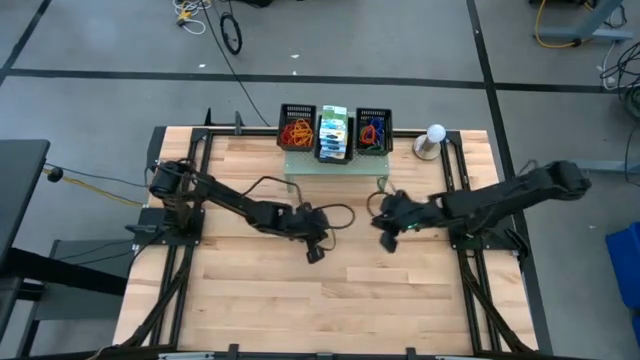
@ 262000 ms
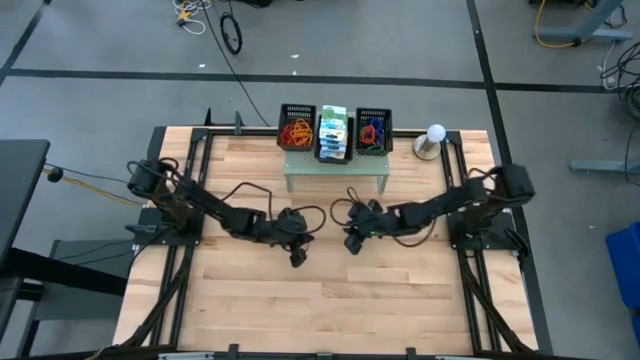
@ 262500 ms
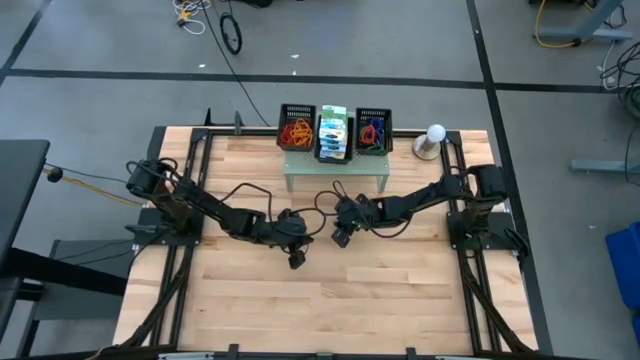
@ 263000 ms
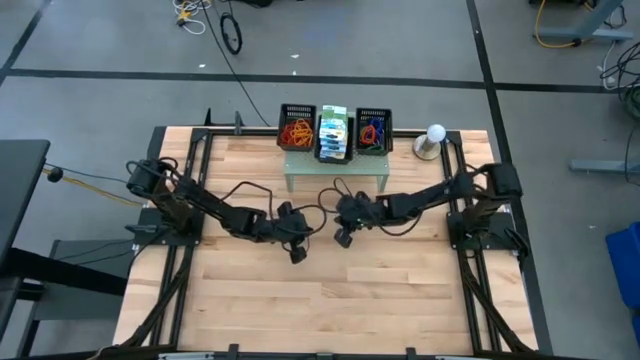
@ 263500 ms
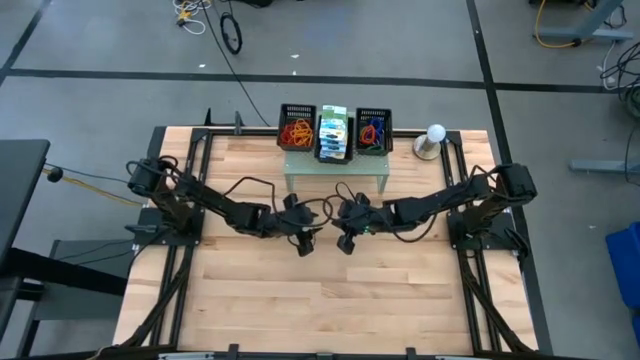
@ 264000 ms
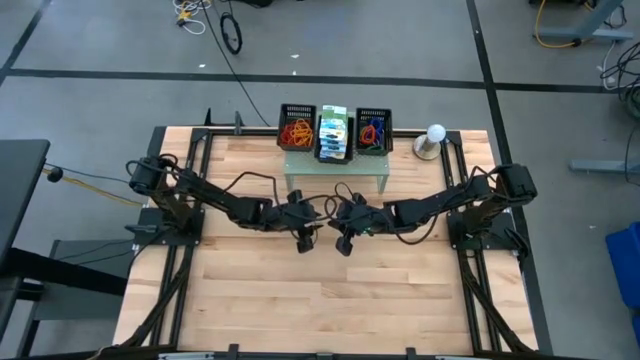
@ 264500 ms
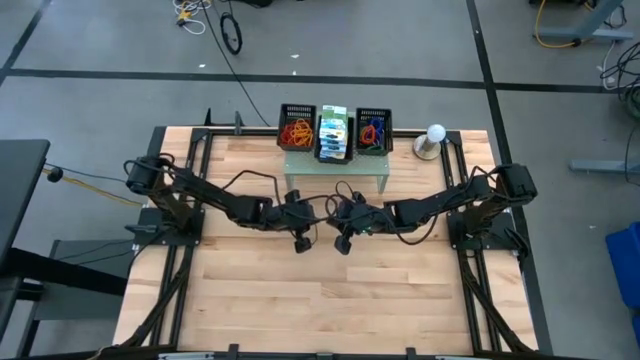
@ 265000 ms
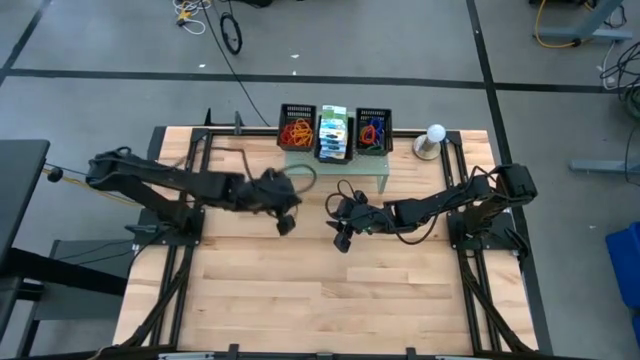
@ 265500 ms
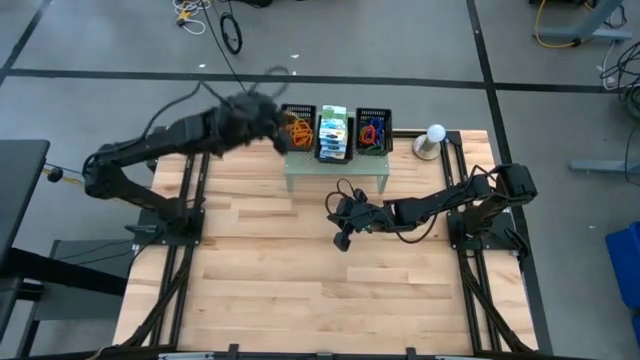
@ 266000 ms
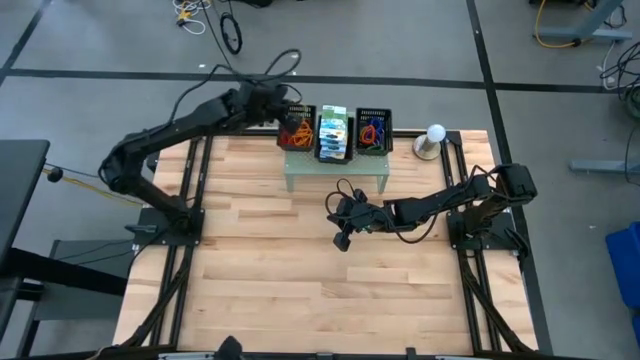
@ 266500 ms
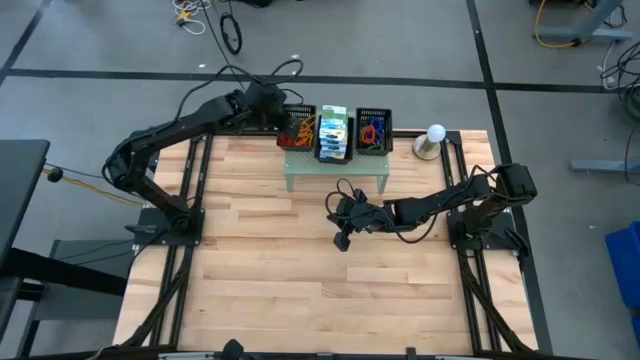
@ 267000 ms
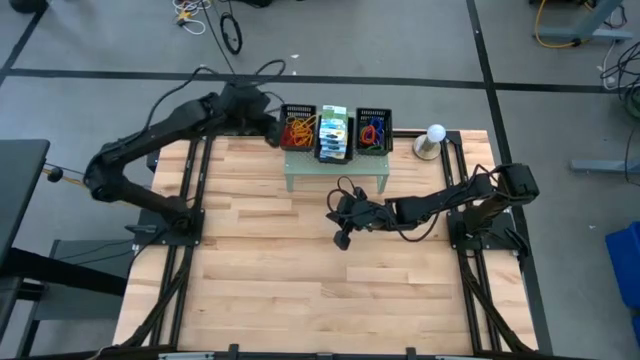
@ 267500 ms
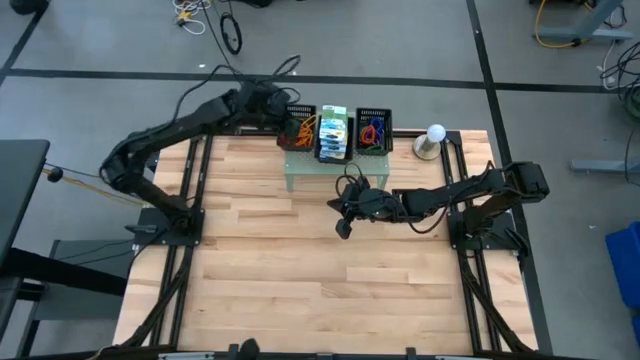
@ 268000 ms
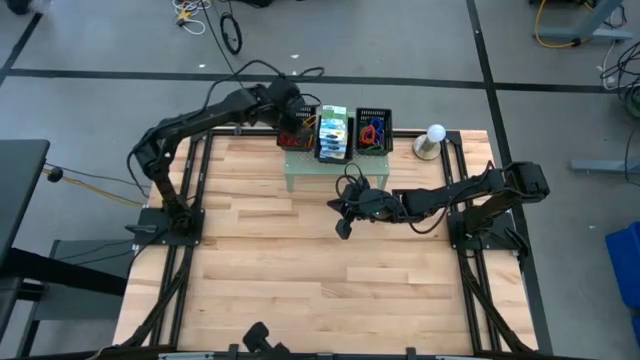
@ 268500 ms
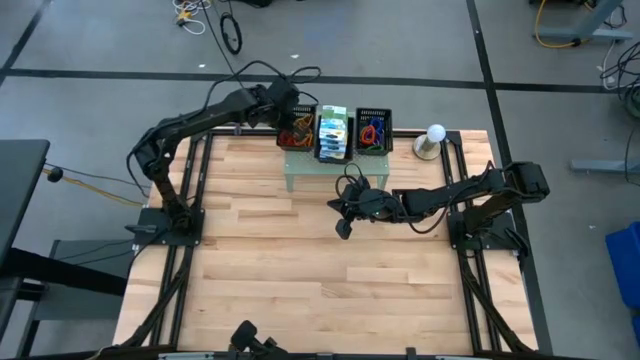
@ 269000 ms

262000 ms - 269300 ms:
Task: Pick & Place Office Desk Supplies
Put the yellow rubber band into the left black bin on the shelf

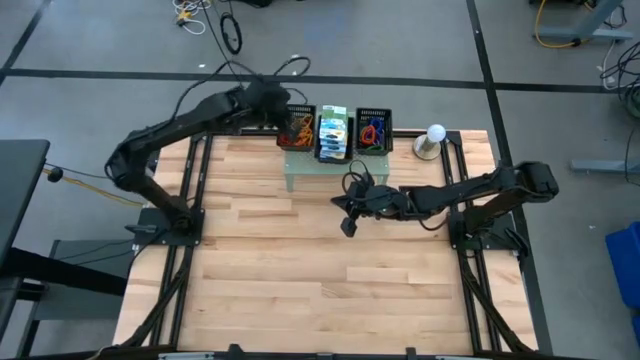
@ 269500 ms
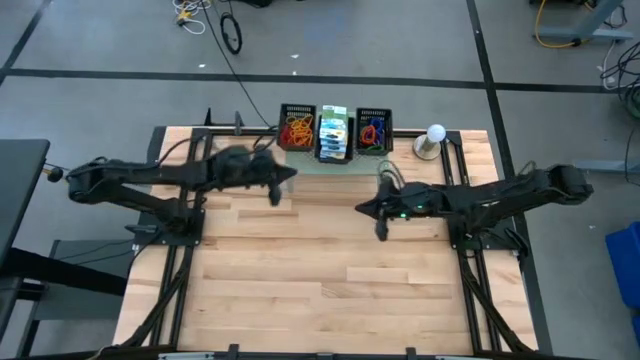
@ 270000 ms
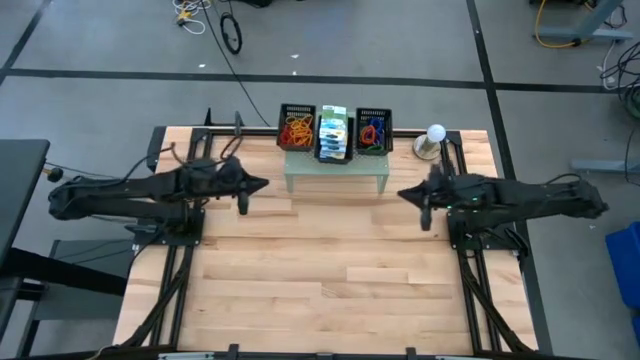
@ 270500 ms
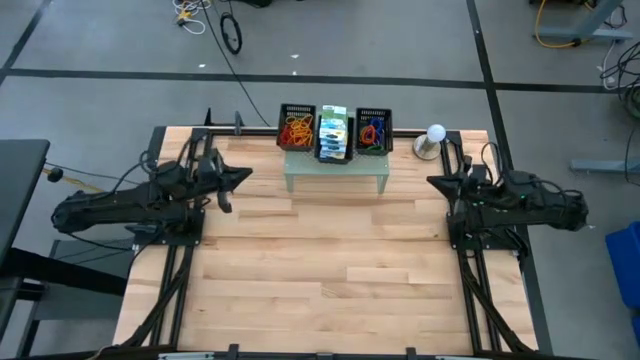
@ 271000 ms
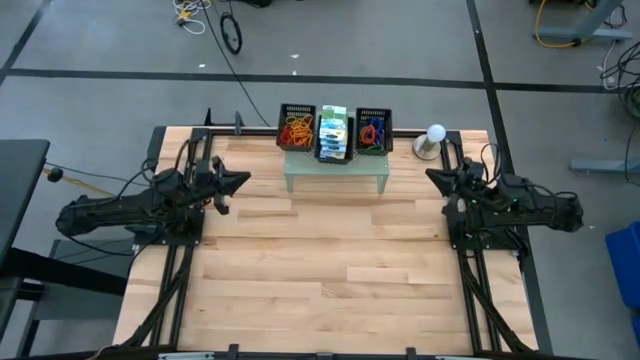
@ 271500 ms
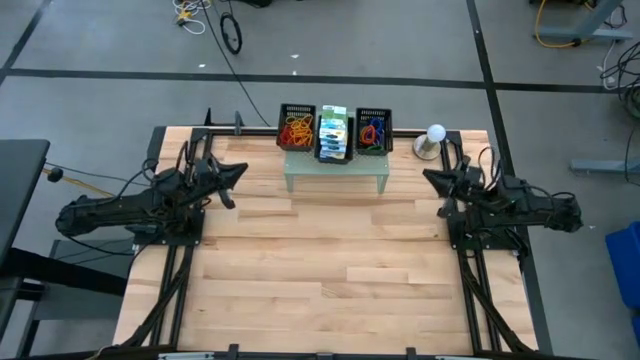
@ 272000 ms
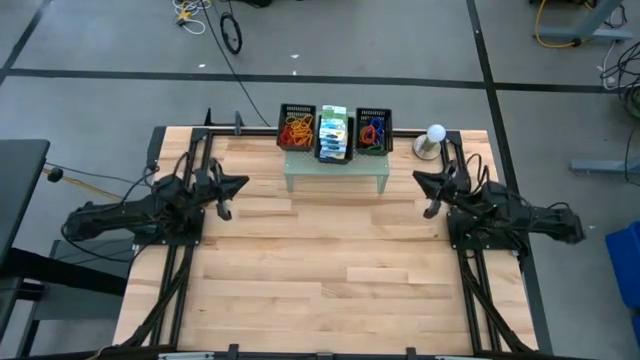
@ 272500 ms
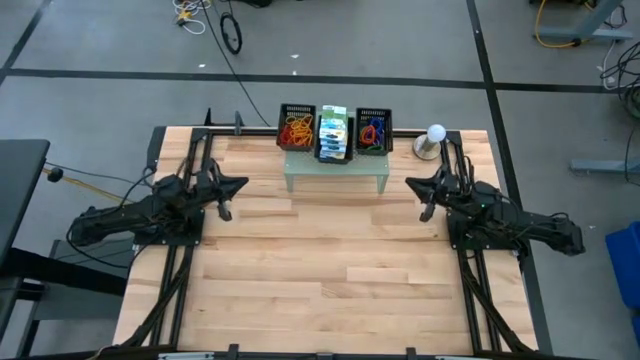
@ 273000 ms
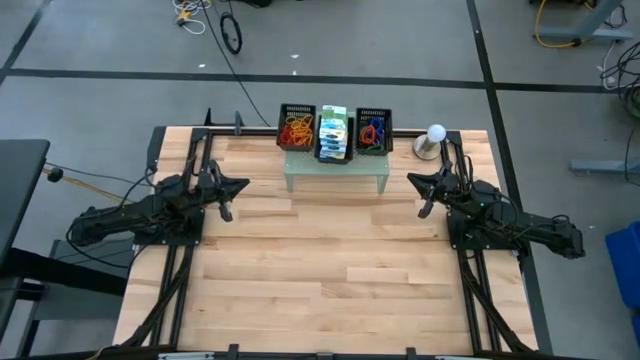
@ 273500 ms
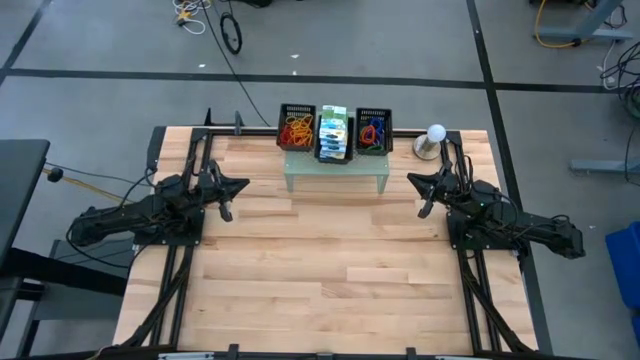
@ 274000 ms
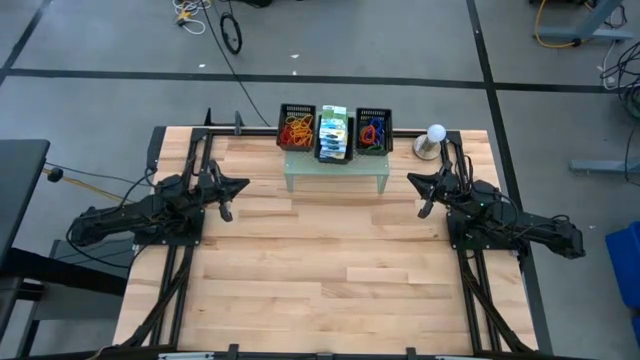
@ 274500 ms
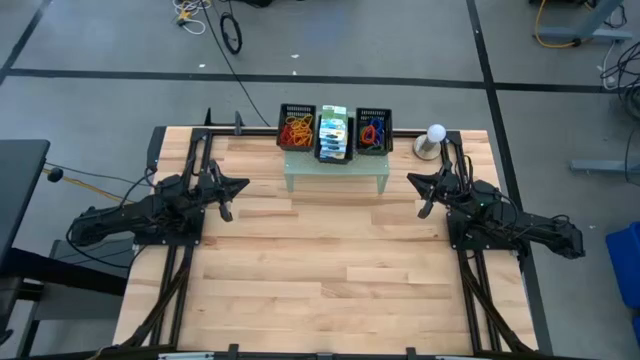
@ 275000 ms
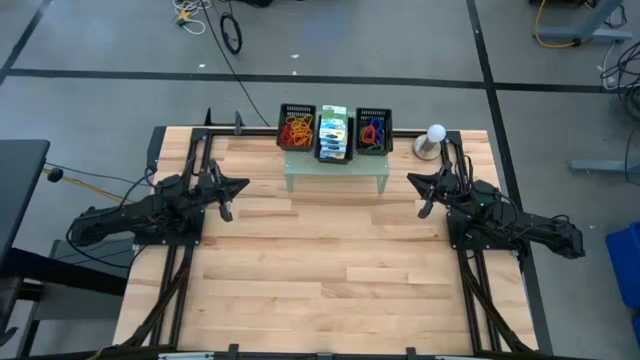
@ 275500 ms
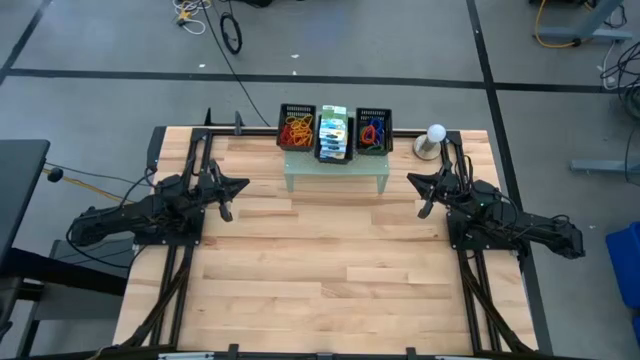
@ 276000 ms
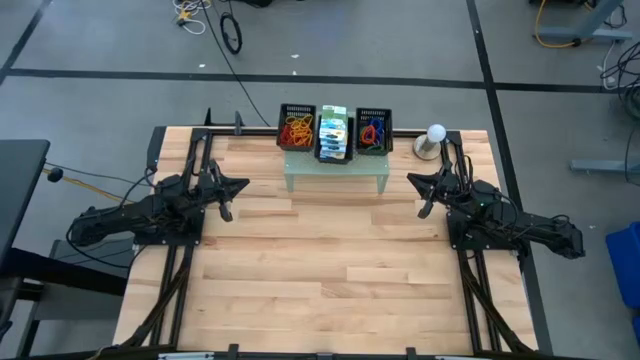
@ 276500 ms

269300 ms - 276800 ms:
Return to Home Position

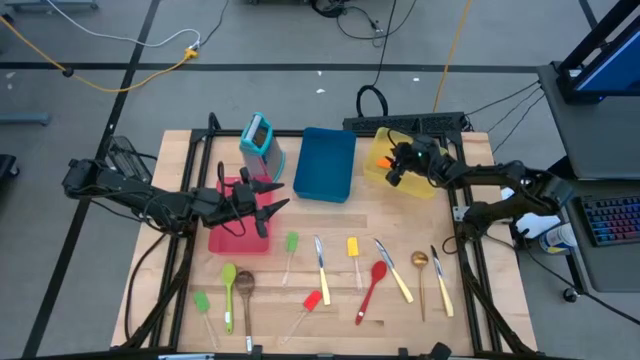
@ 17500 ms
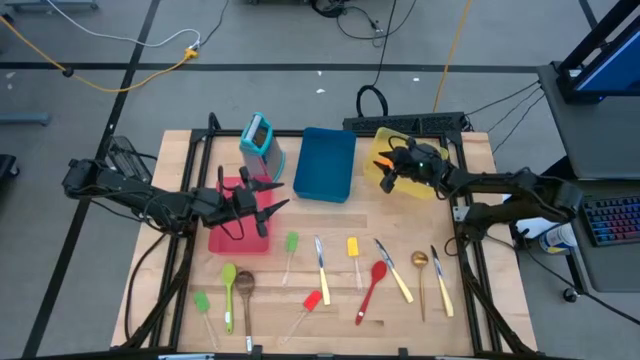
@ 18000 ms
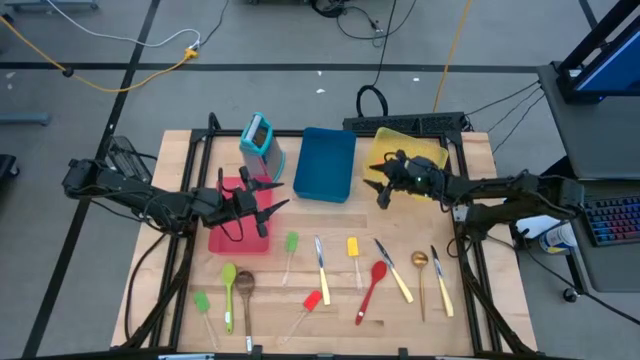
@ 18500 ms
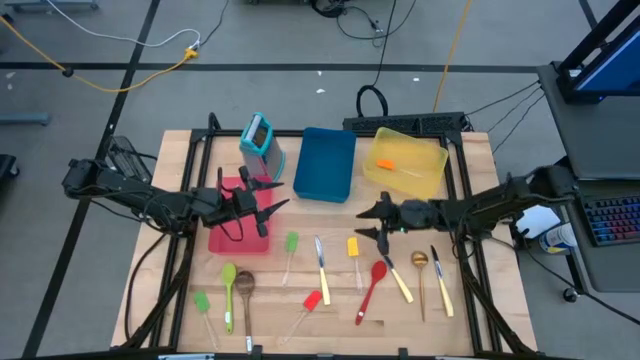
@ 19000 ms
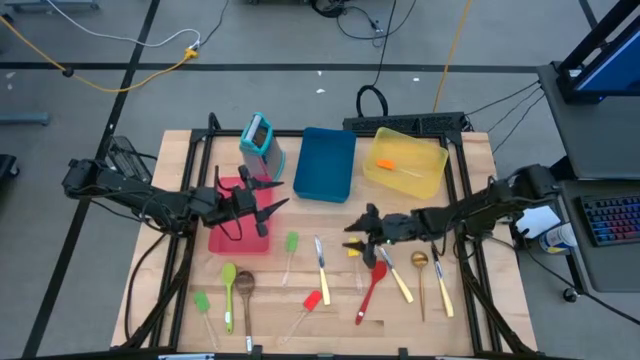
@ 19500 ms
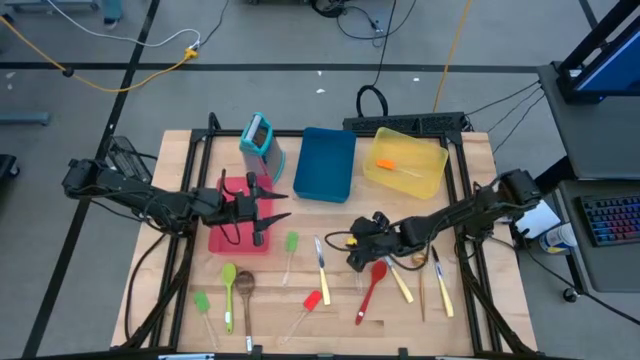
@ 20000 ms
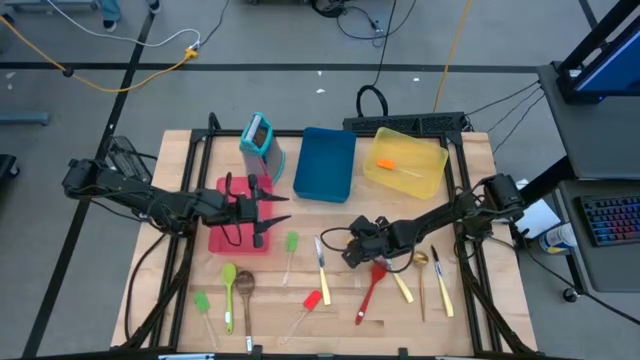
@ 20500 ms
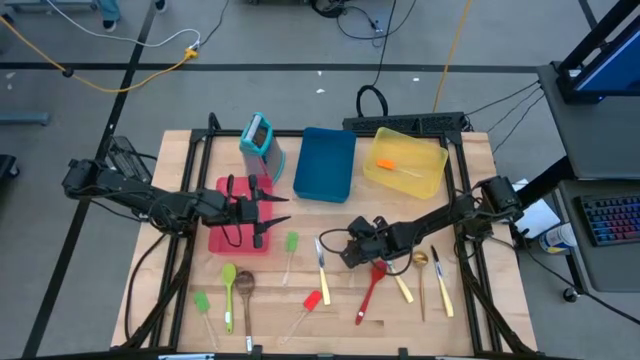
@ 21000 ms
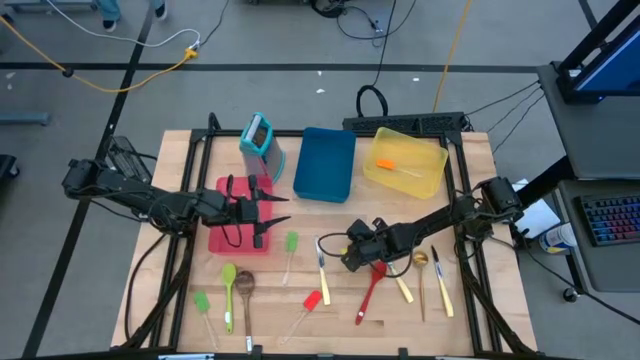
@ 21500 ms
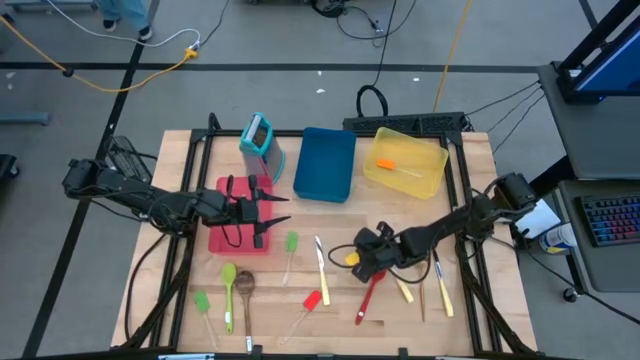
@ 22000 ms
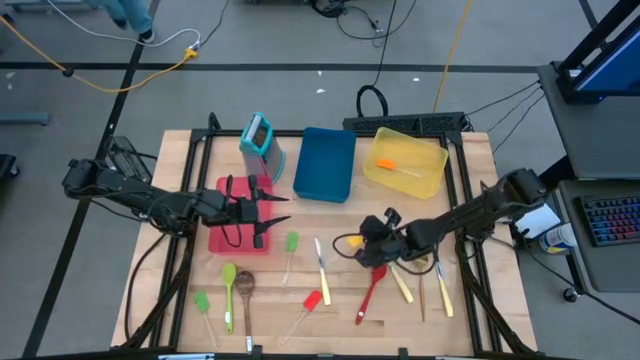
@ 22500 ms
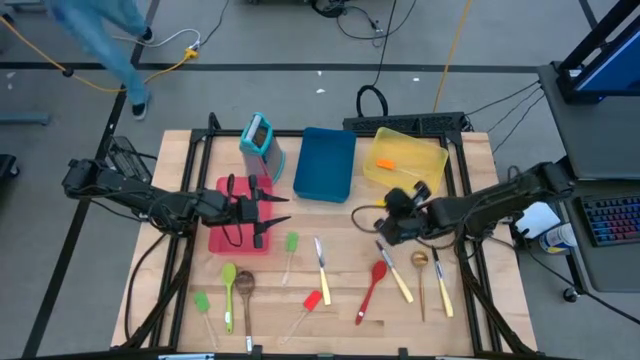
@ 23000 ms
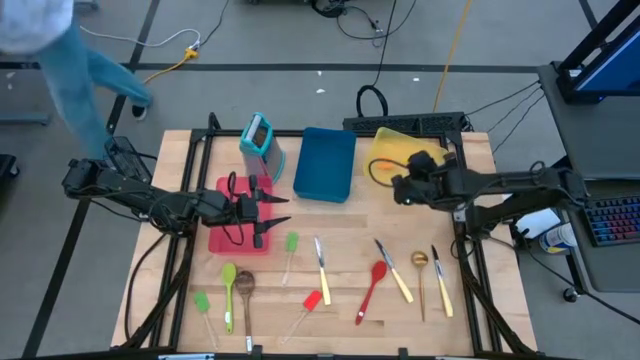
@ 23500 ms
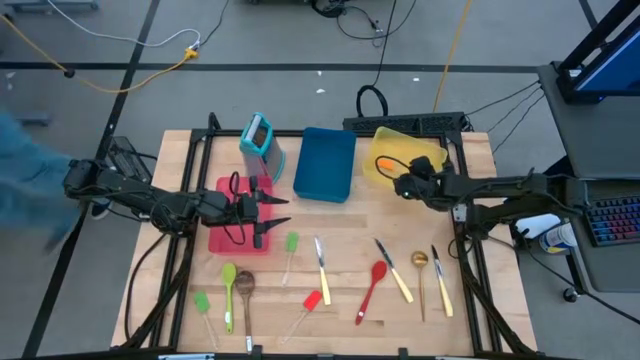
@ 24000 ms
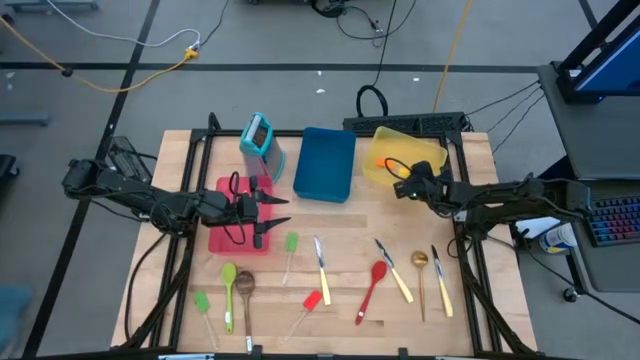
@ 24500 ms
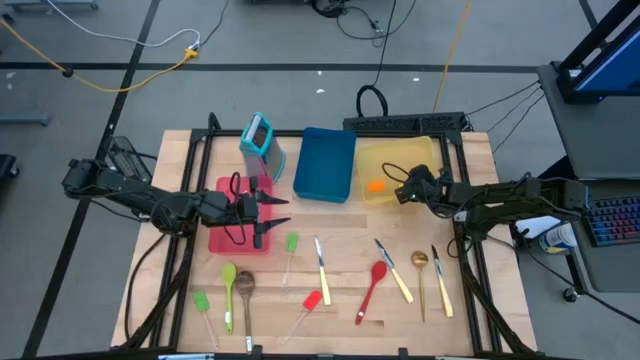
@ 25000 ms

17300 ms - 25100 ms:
Task: Pick & Place Kitchen Items
Put the yellow spatula into the yellow bin
